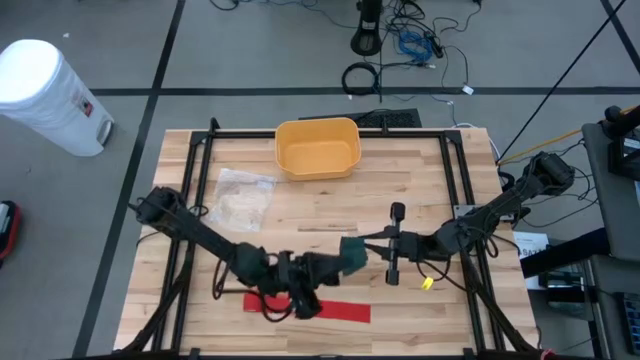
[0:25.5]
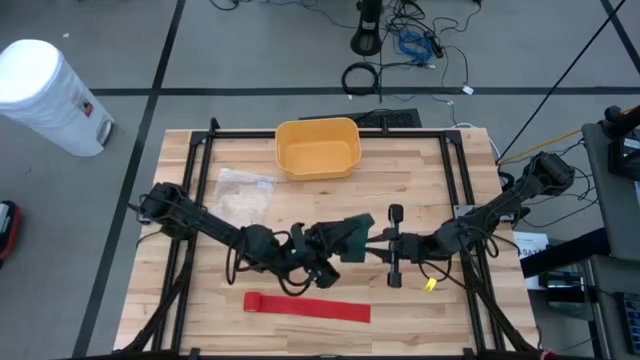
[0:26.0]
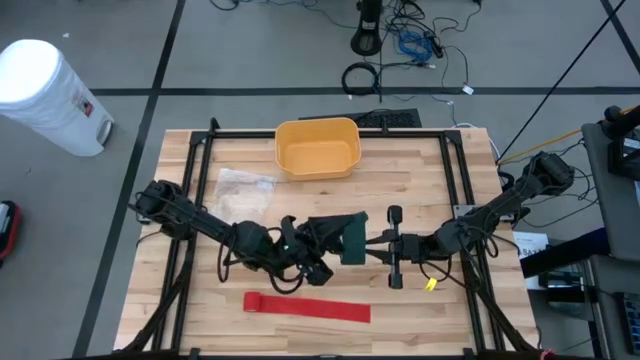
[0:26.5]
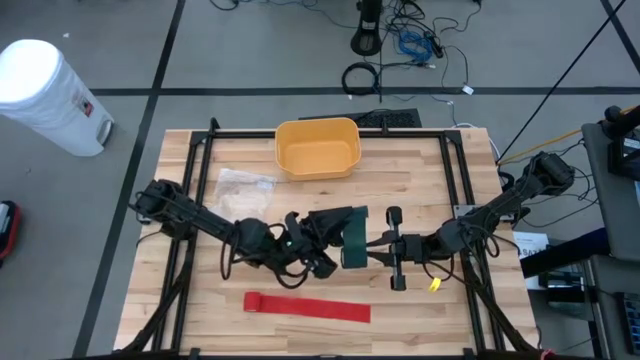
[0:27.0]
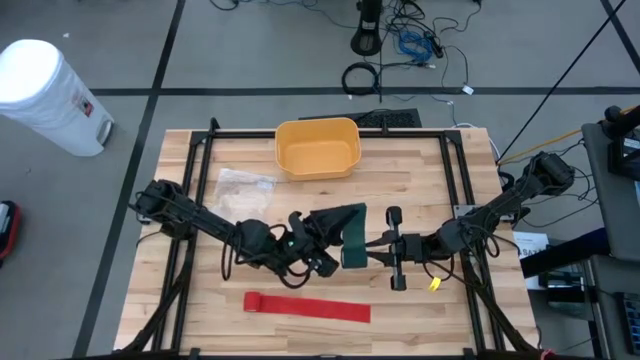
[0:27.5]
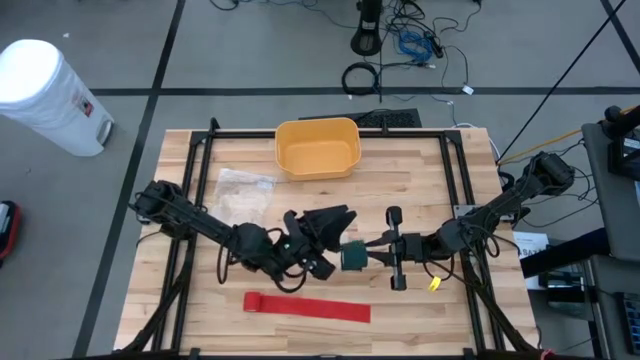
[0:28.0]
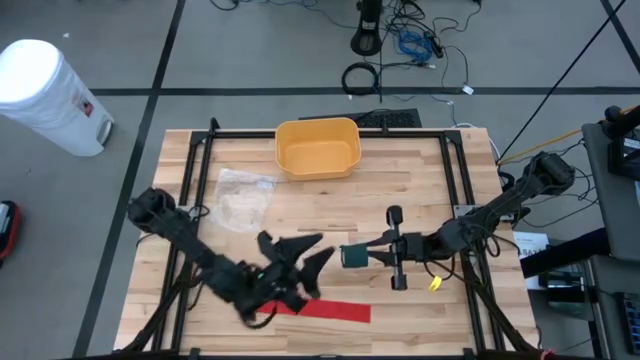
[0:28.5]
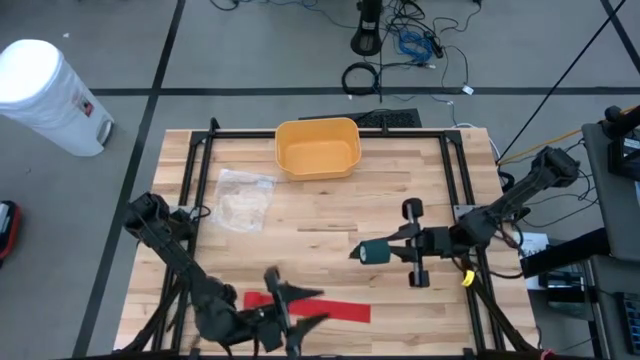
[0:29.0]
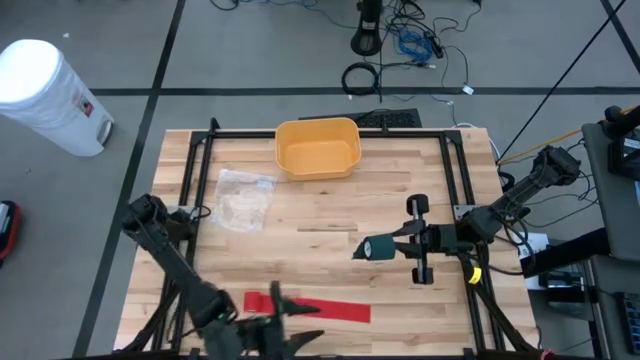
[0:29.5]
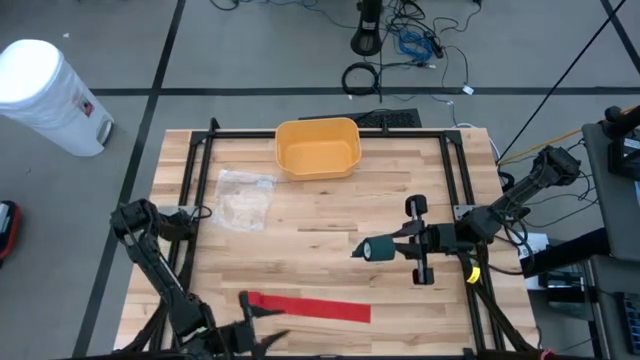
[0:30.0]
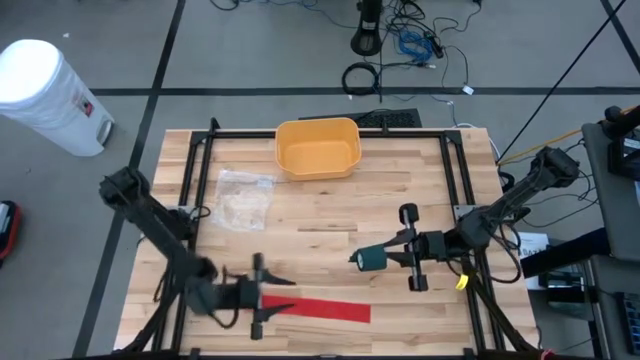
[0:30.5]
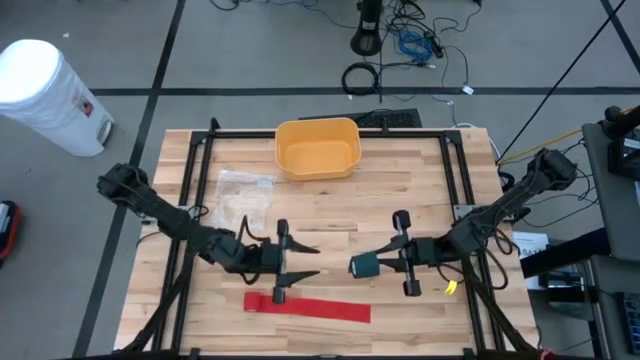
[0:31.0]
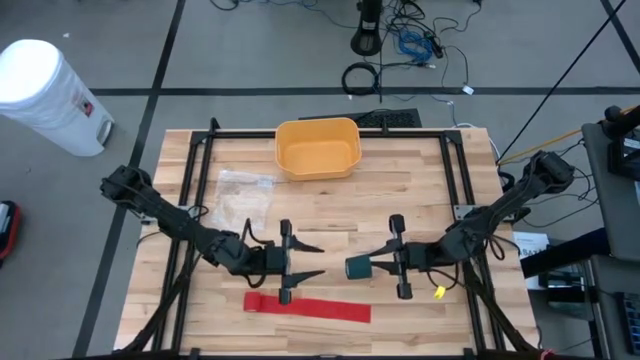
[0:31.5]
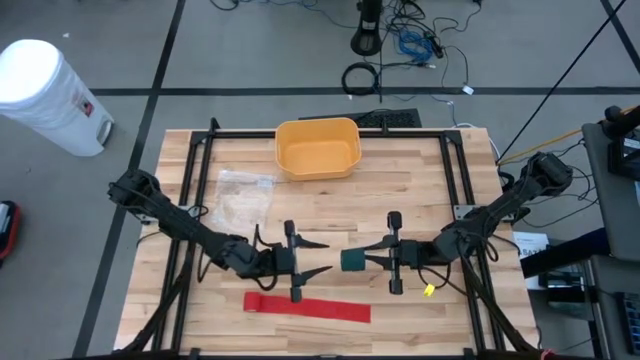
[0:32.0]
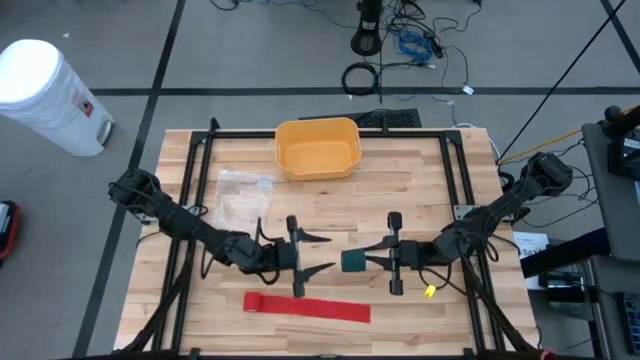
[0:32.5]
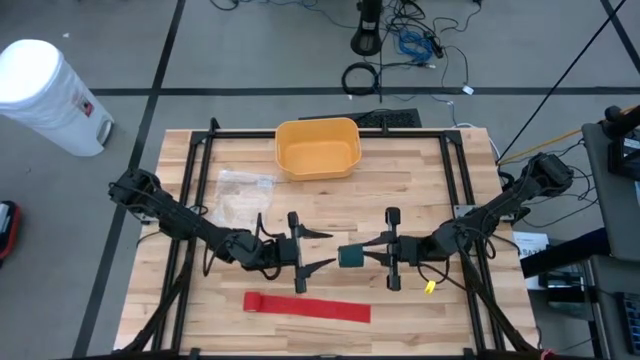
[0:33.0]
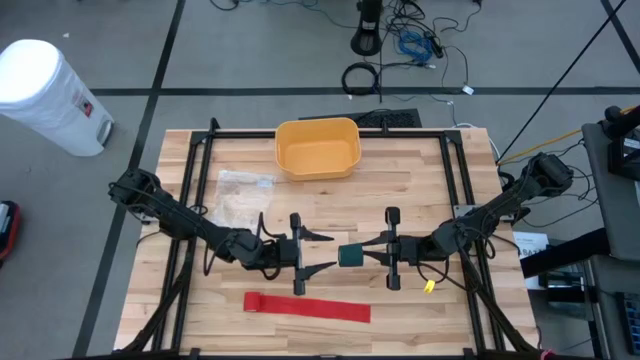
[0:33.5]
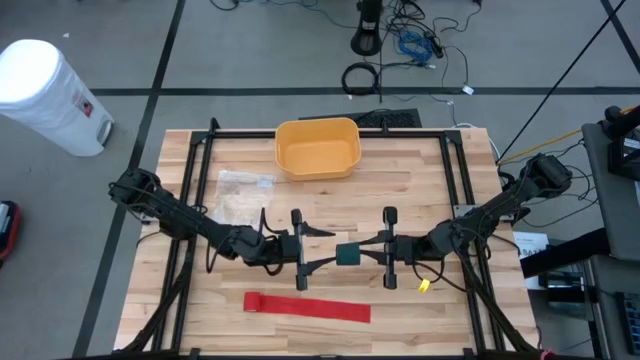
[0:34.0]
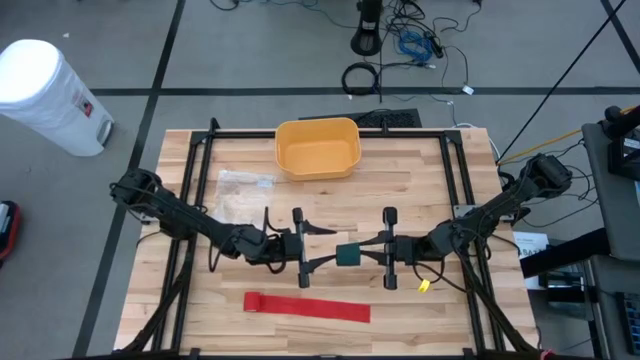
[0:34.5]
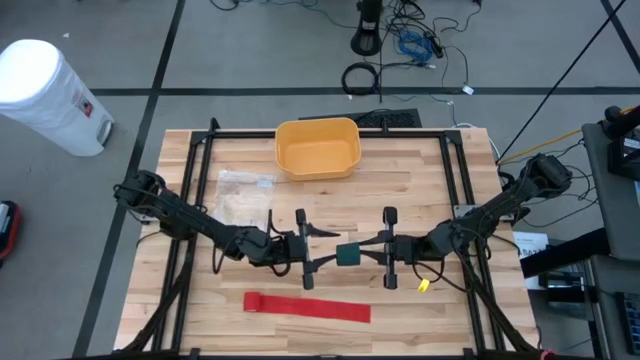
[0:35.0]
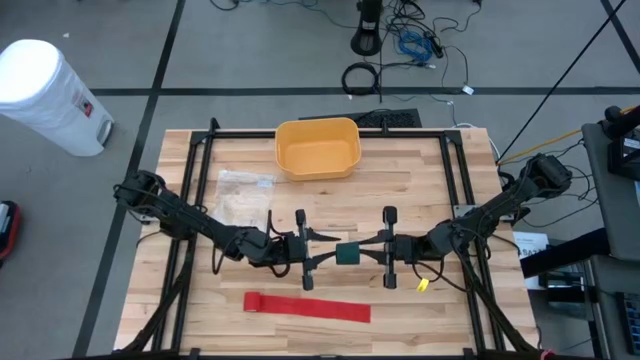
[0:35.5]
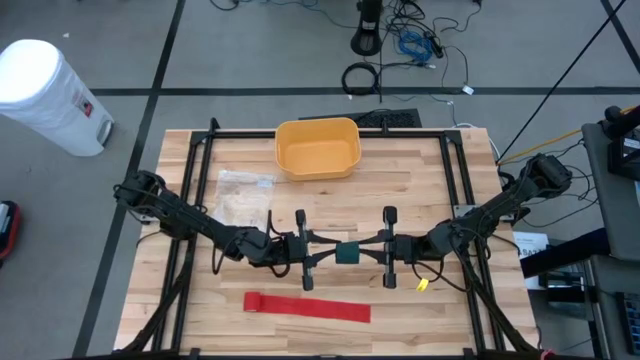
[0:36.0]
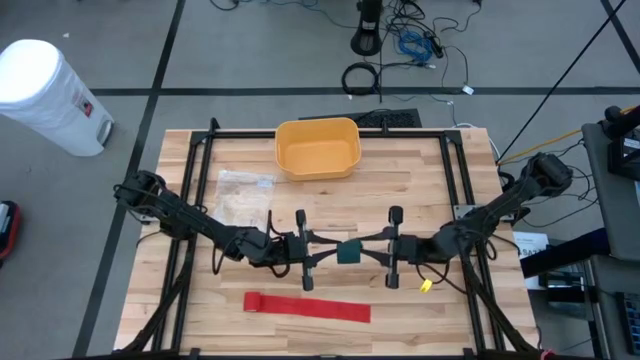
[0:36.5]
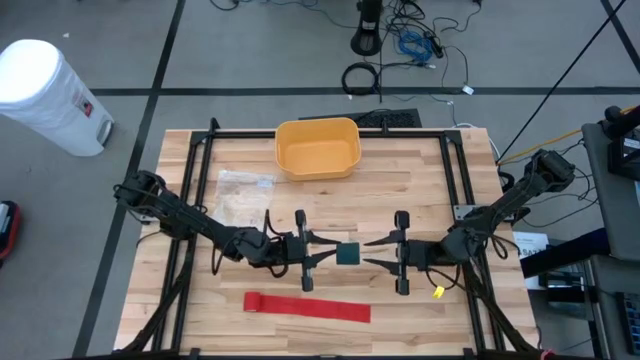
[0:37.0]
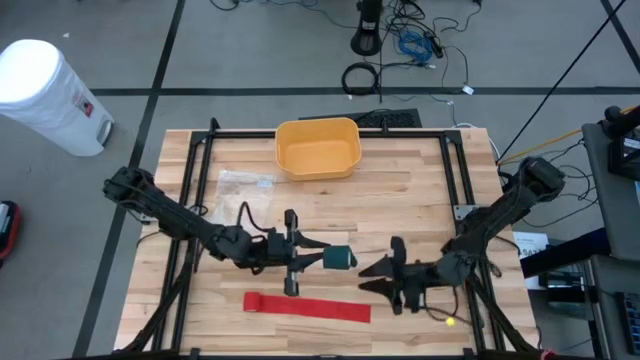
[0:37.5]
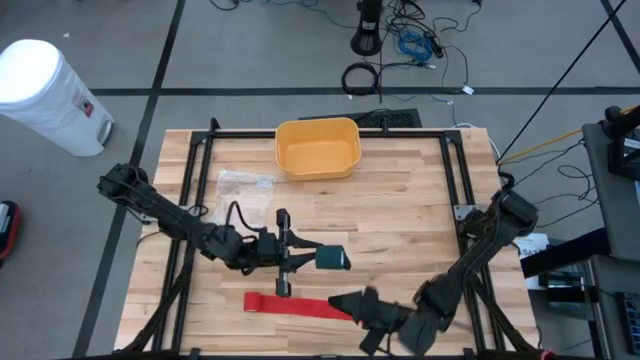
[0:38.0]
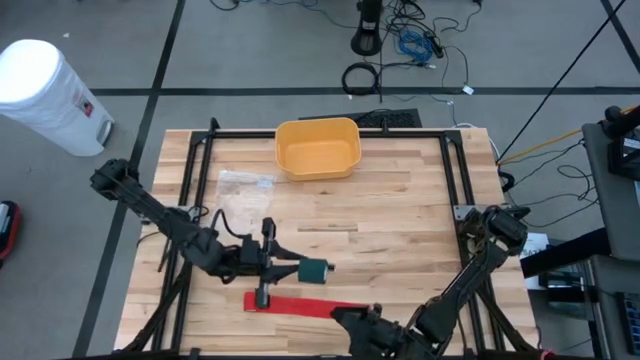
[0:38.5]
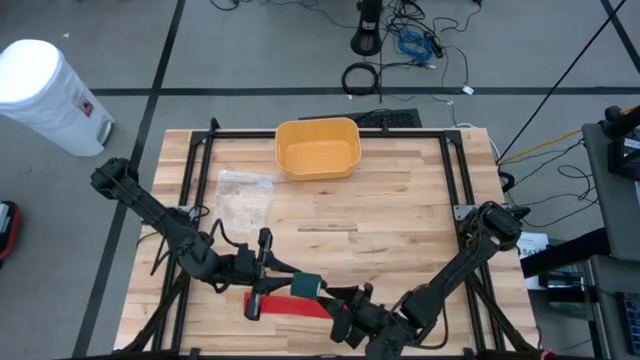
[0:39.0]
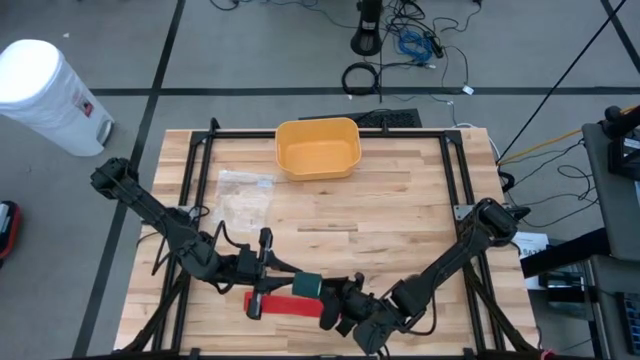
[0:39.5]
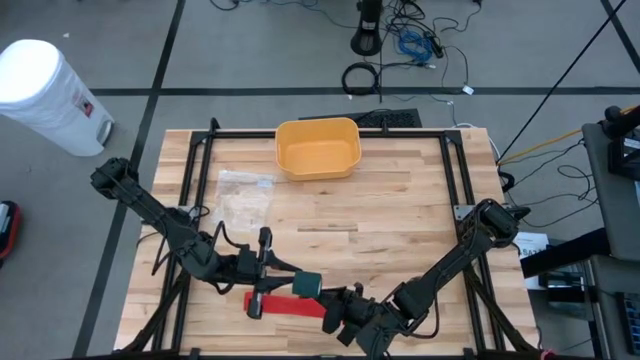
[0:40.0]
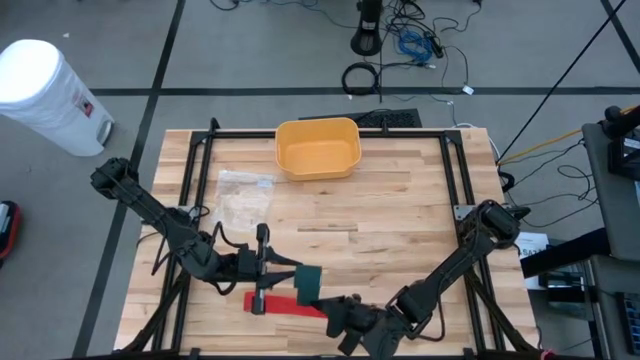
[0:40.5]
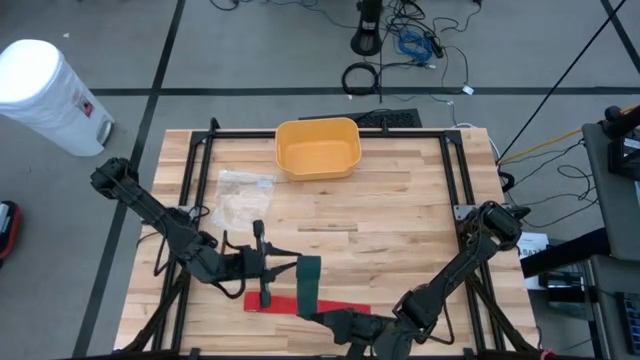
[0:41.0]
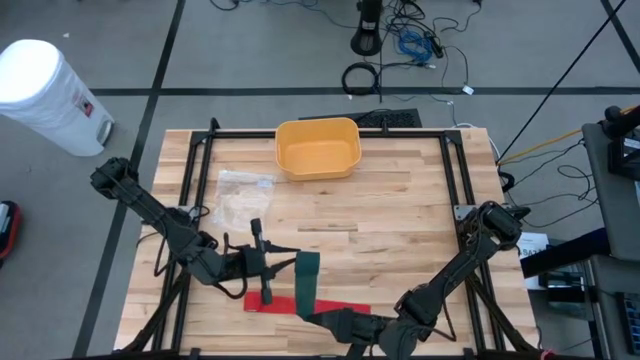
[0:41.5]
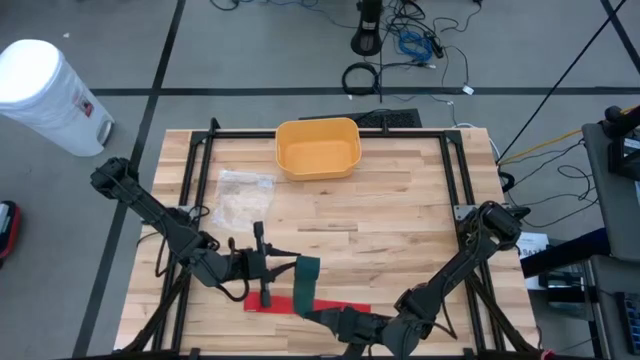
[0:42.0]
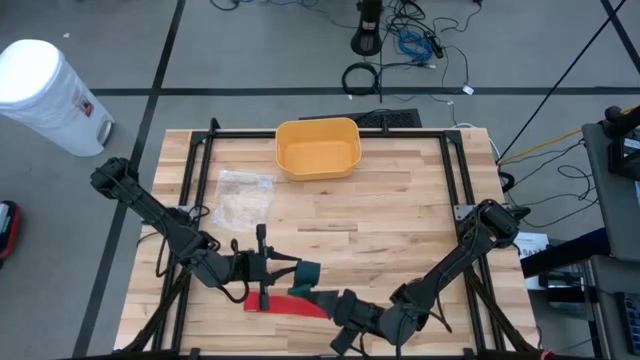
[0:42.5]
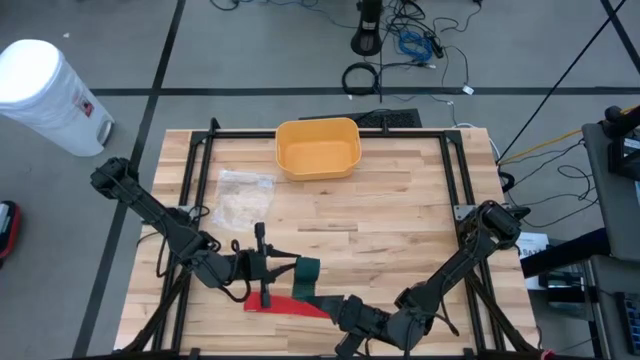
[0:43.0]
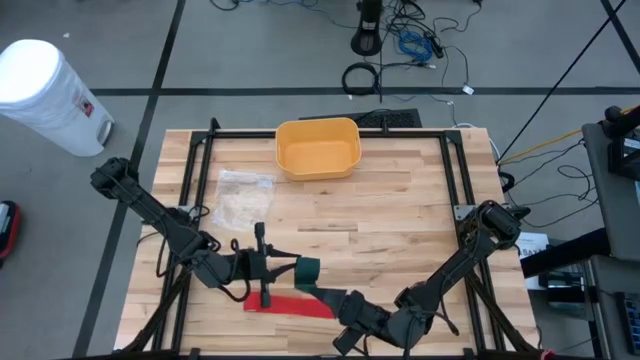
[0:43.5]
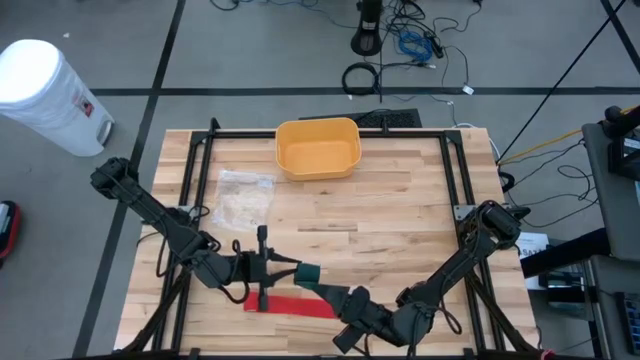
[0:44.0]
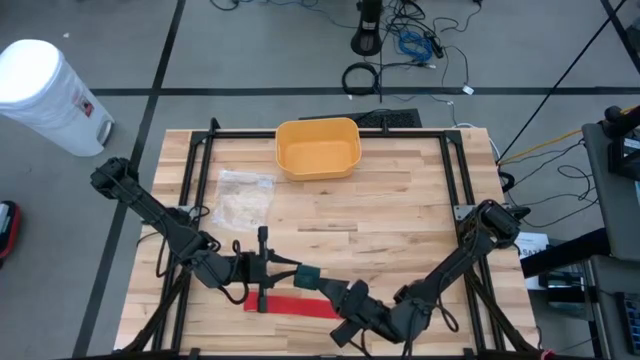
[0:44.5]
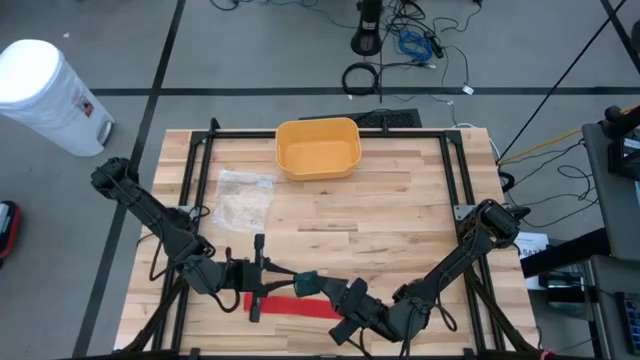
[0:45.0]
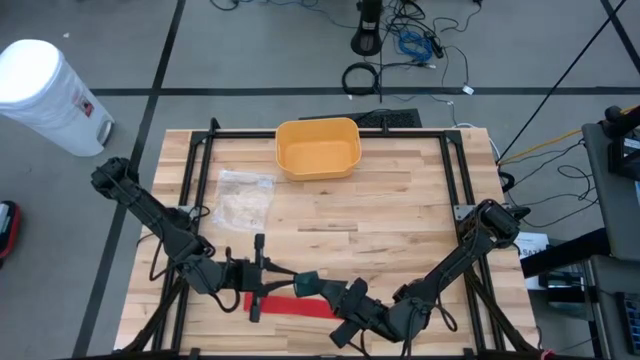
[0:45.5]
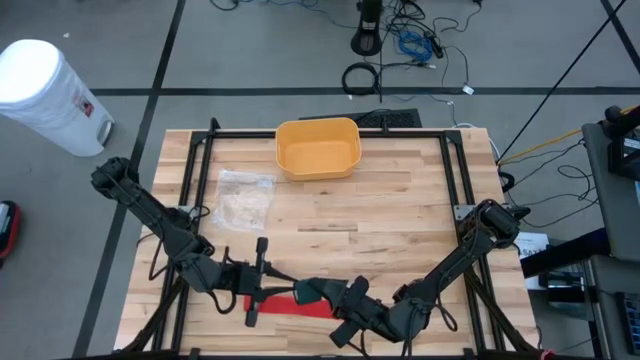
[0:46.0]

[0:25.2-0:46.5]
Task: Roll bandage
Roll the green bandage

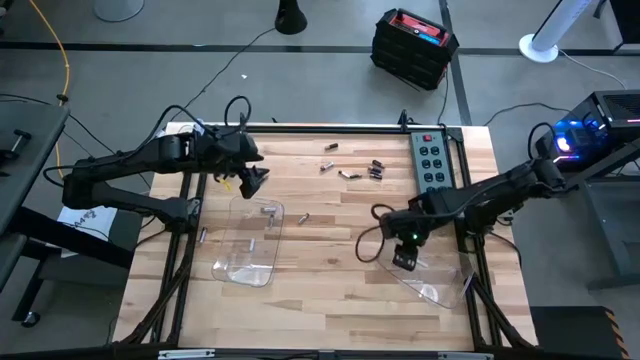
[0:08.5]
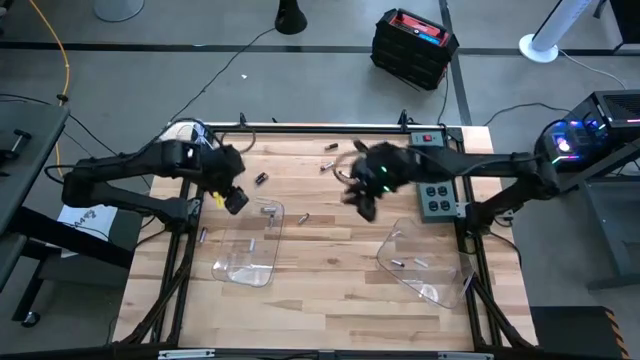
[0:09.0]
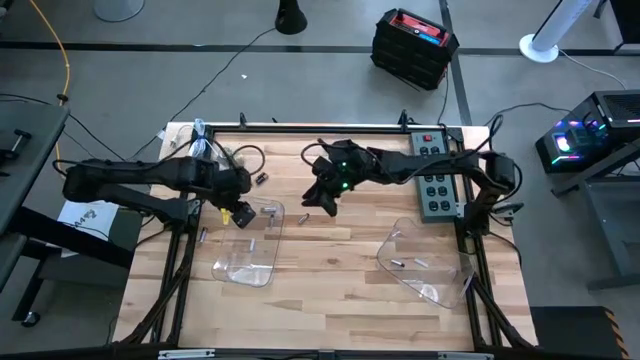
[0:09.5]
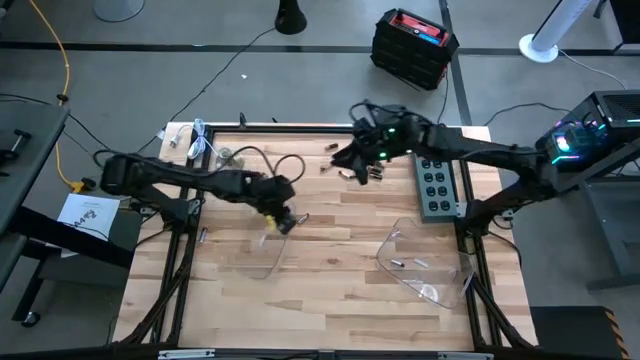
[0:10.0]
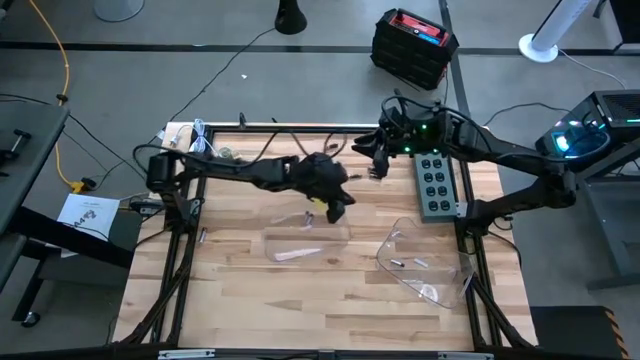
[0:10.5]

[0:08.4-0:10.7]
Task: Sort batteries
Adjust the left transparent bin
